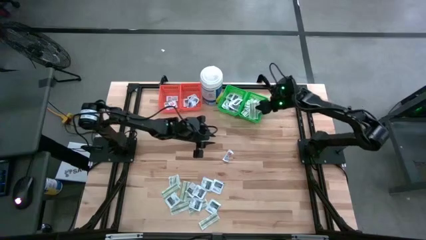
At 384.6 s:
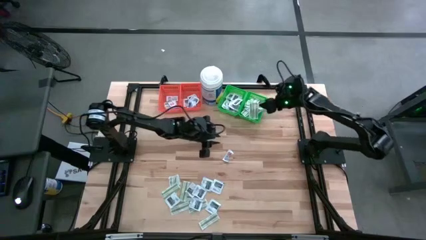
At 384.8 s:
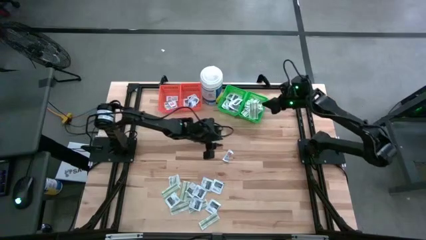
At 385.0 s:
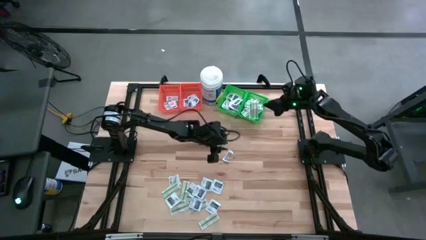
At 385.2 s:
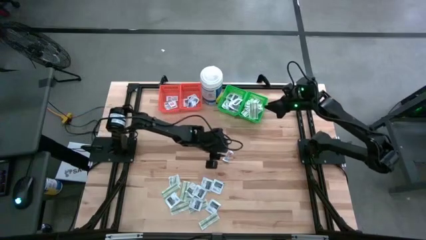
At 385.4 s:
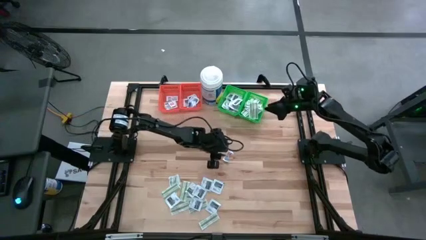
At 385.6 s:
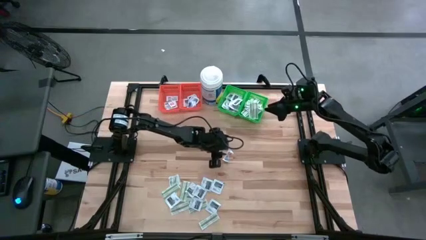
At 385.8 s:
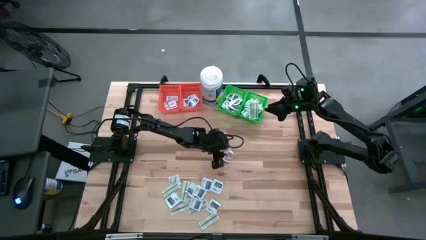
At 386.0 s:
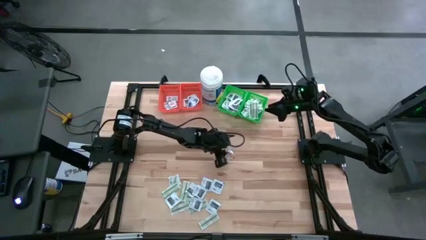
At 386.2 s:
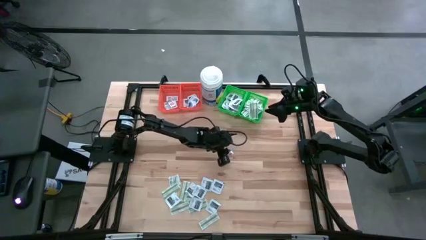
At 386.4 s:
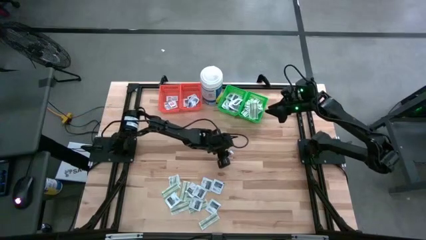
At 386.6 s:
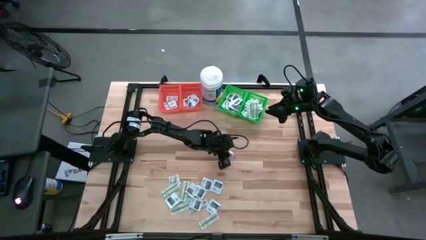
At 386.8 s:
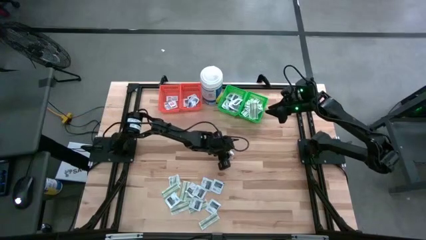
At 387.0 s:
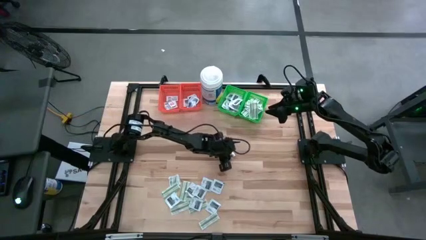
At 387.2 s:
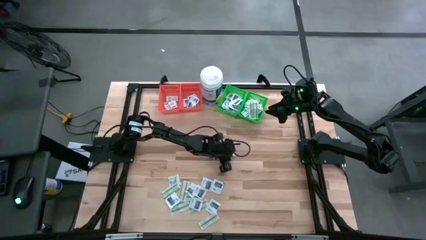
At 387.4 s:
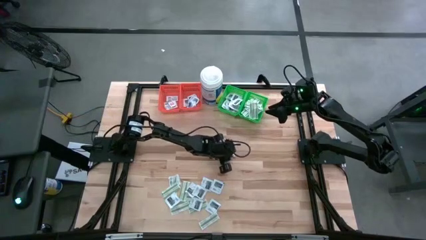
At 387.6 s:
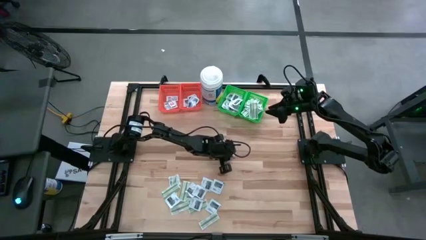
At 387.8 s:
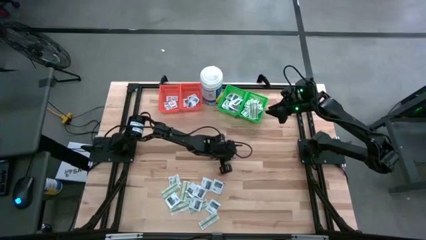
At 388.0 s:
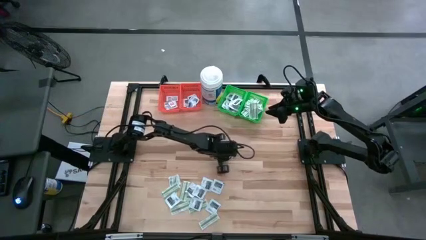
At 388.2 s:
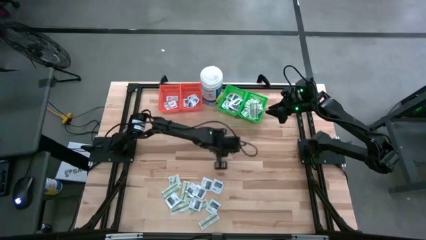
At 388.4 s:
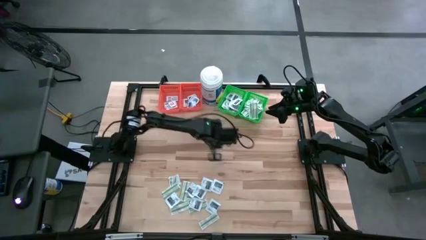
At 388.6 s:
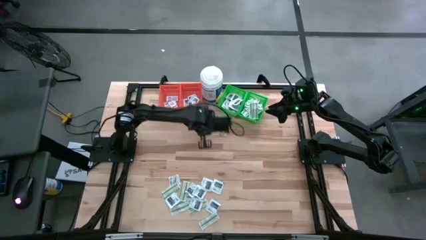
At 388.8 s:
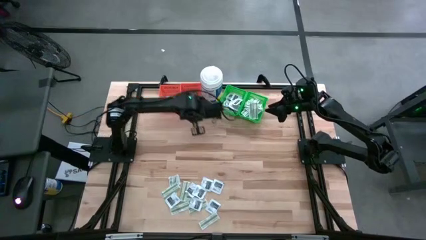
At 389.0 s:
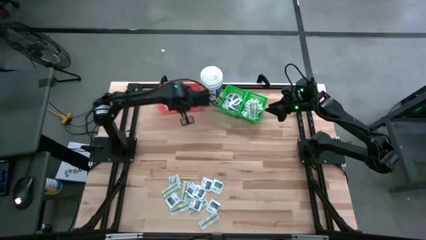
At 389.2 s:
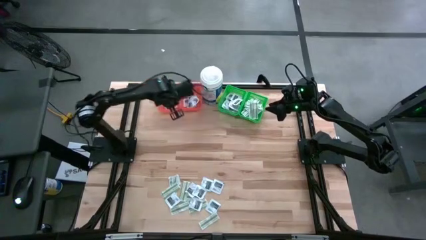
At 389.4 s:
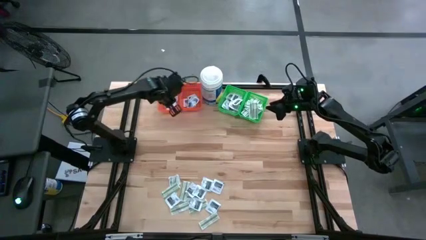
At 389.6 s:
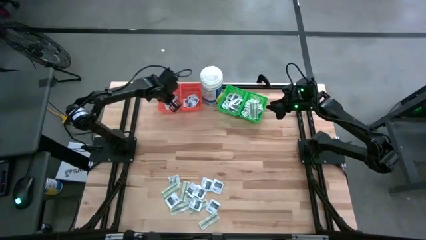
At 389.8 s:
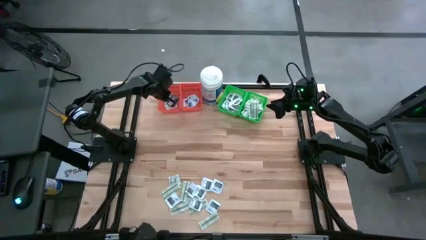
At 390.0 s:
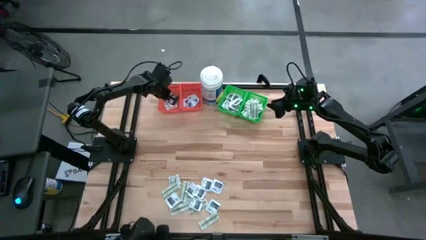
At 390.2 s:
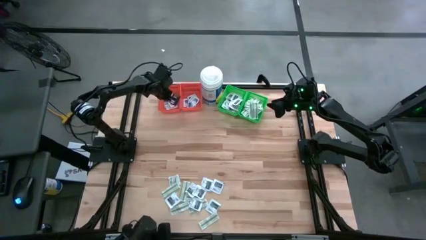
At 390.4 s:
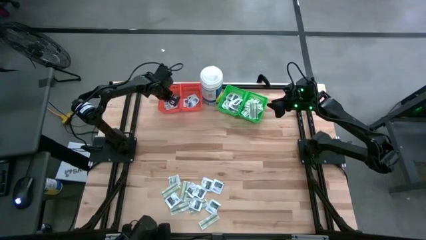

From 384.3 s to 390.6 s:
Task: Pick & Place First Aid Supplies
Put the orange ointment pack into the left orange bin

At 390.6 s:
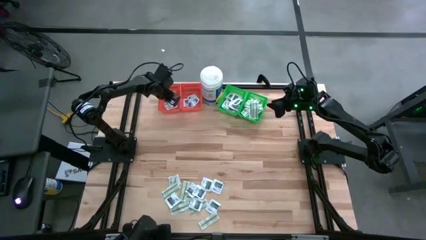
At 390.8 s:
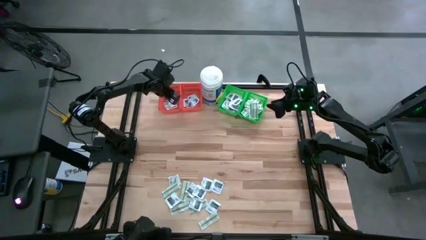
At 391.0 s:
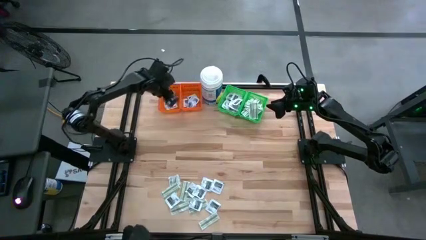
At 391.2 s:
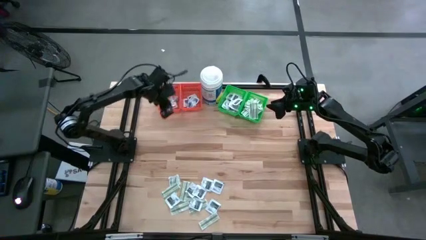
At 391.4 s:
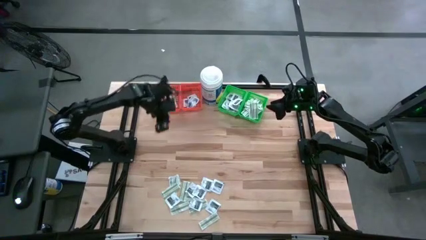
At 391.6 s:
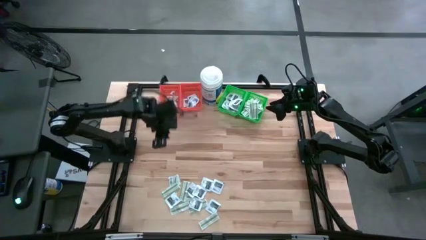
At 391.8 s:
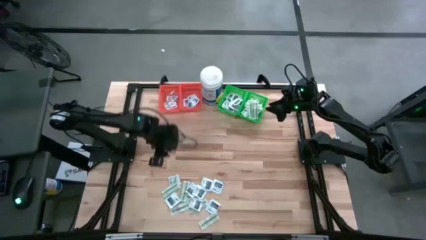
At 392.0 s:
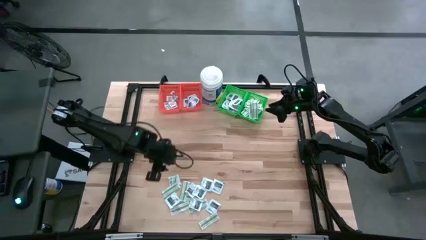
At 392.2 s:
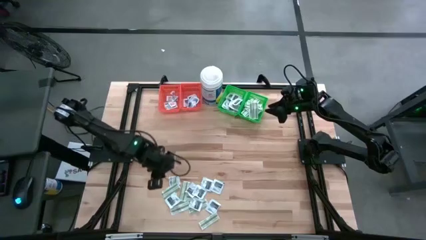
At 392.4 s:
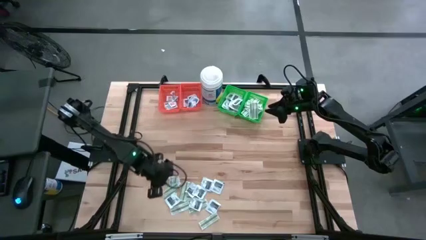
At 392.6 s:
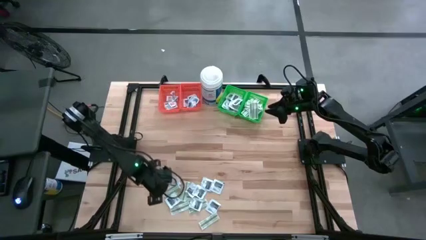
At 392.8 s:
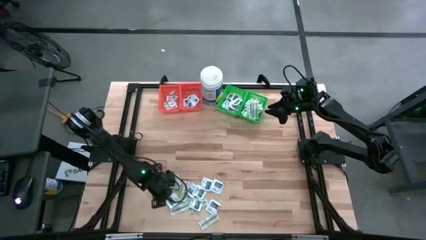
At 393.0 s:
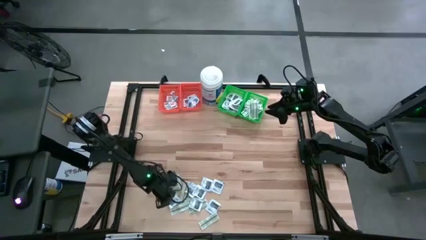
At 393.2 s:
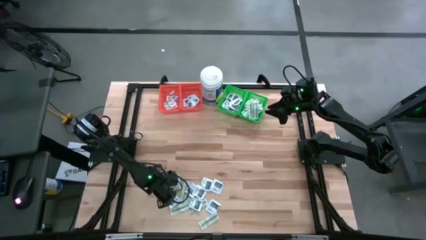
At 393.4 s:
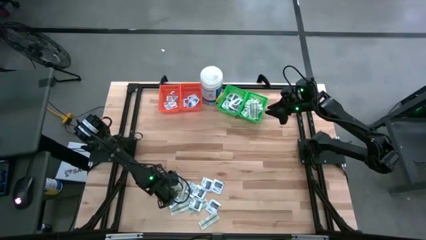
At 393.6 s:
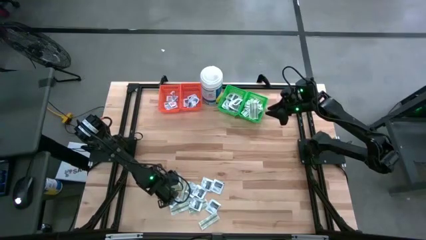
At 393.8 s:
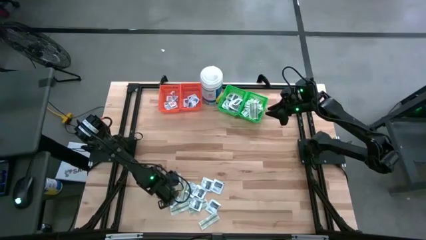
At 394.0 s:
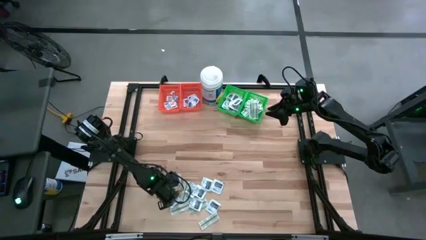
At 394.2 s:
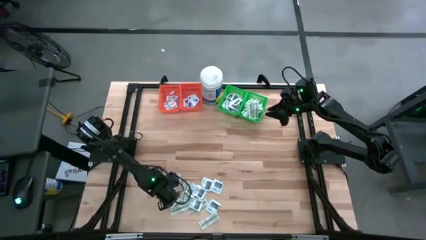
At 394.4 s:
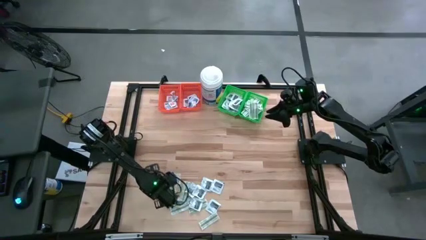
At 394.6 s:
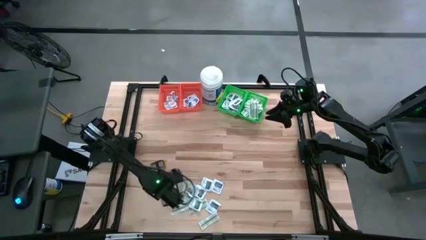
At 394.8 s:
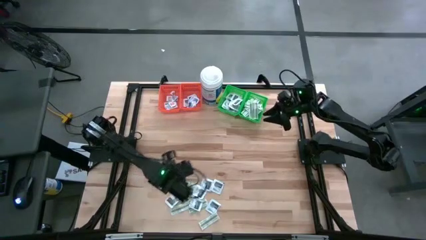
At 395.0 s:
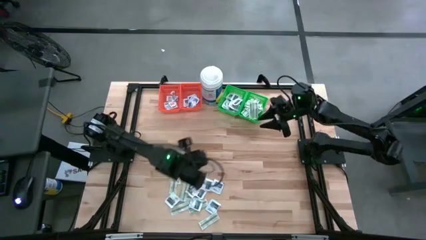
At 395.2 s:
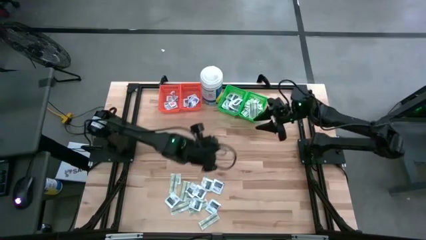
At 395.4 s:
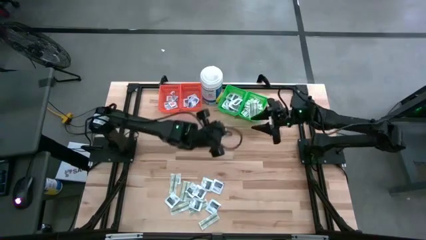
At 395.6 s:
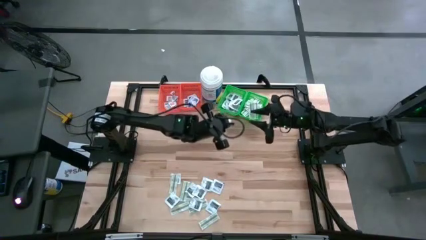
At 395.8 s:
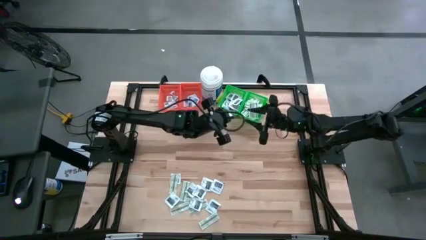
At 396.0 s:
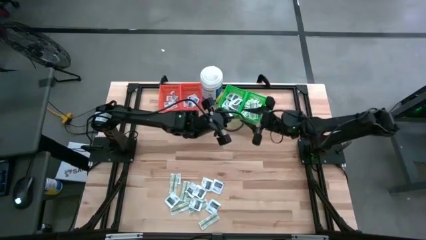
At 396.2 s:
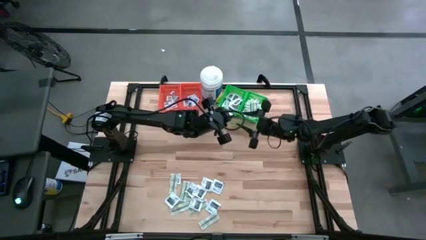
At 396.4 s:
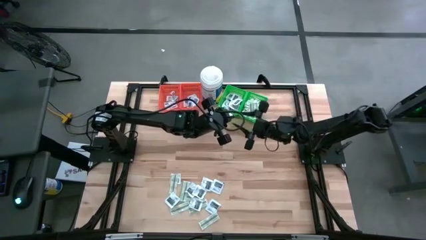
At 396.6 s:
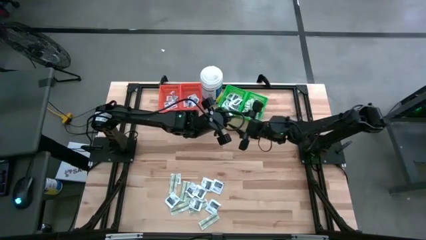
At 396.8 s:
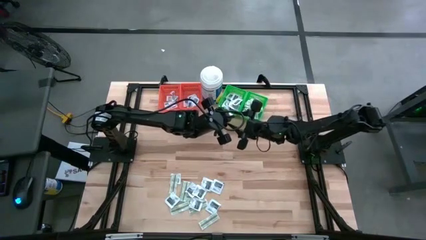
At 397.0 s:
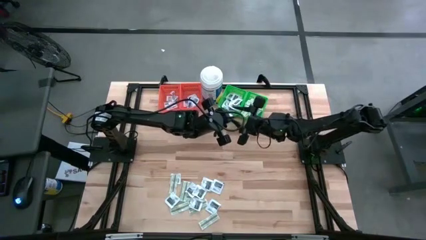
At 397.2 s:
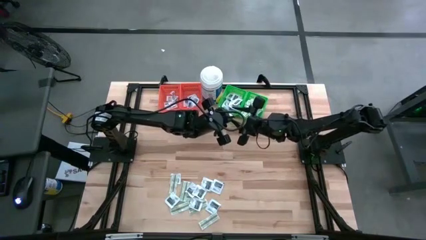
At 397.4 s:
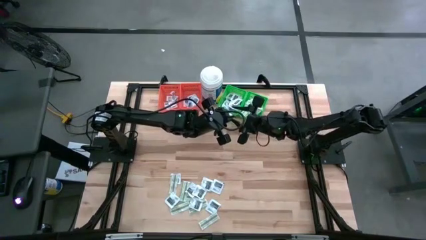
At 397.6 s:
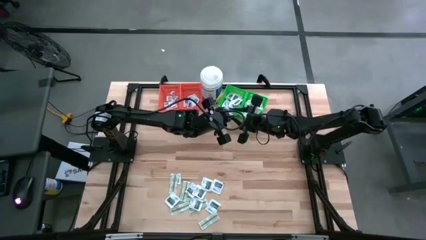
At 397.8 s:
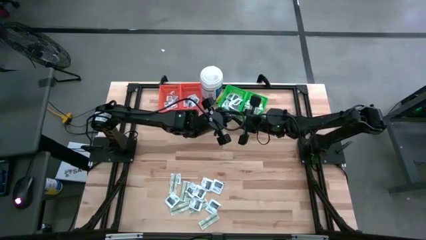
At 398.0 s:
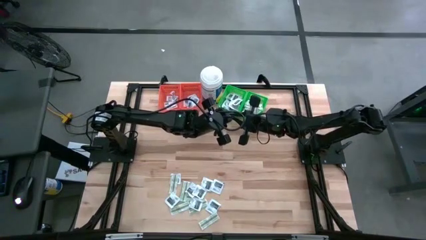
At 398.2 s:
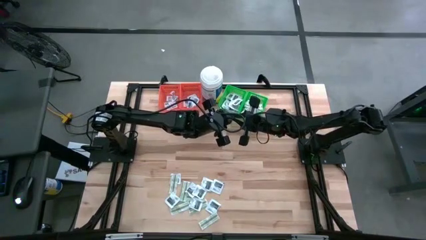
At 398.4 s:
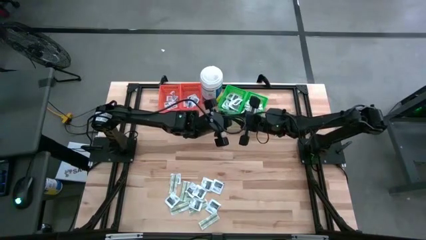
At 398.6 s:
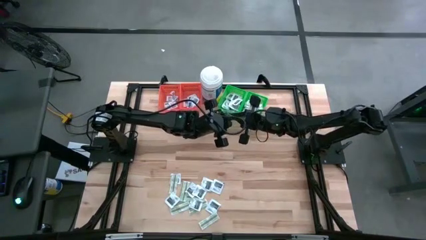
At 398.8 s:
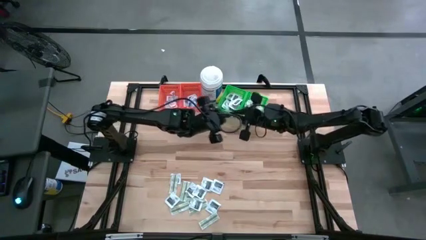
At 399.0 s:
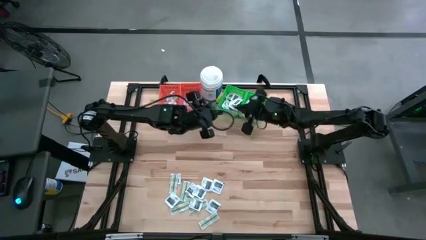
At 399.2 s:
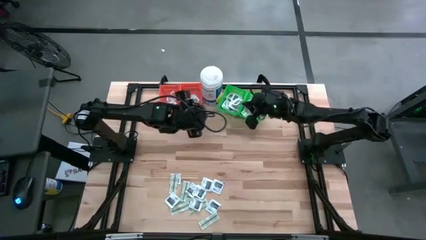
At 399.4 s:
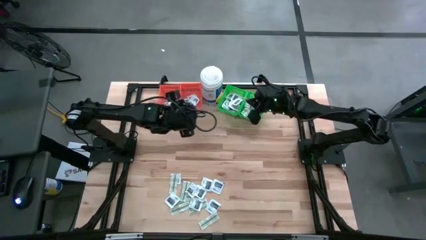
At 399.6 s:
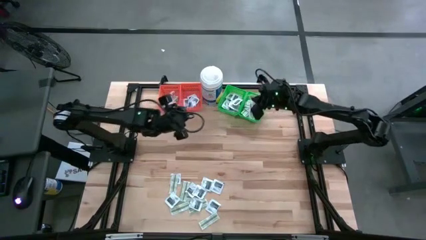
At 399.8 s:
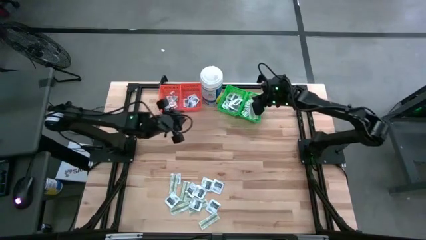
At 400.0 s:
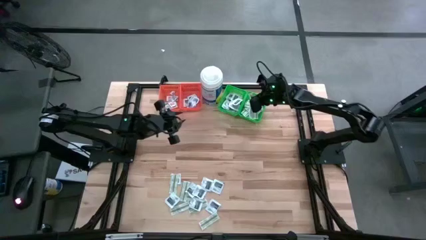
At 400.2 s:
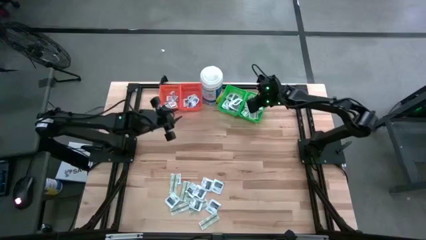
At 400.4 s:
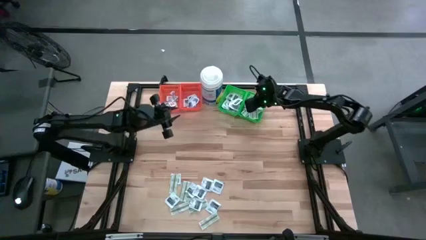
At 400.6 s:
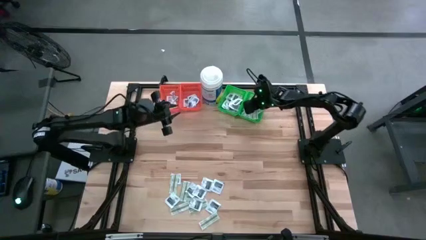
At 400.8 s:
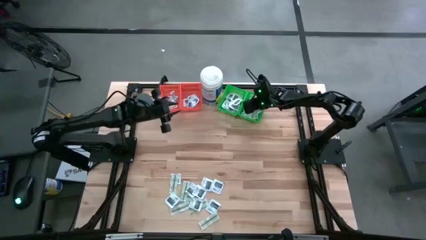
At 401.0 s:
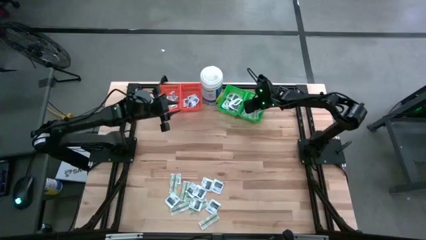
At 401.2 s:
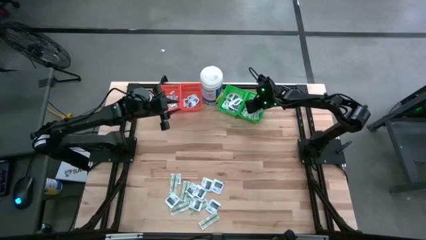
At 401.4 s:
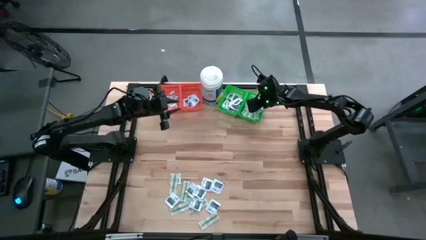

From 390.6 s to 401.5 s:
Put the green bandage pack into the right green bin
